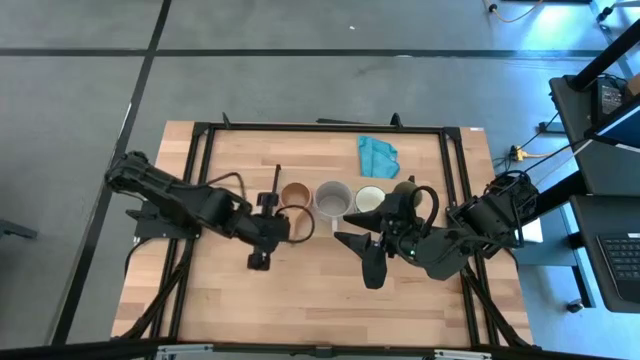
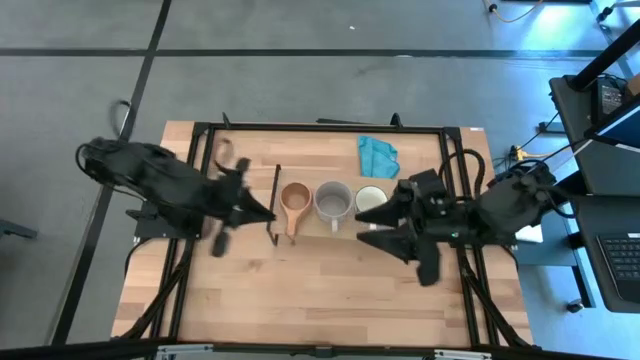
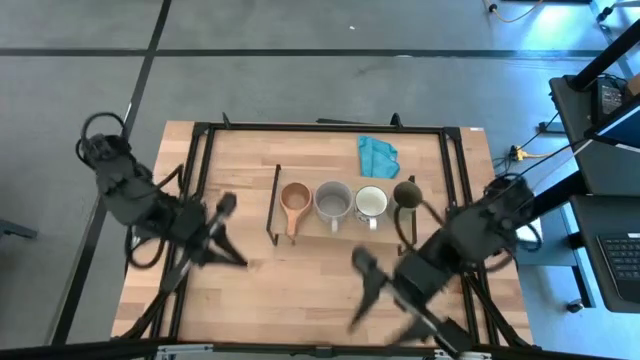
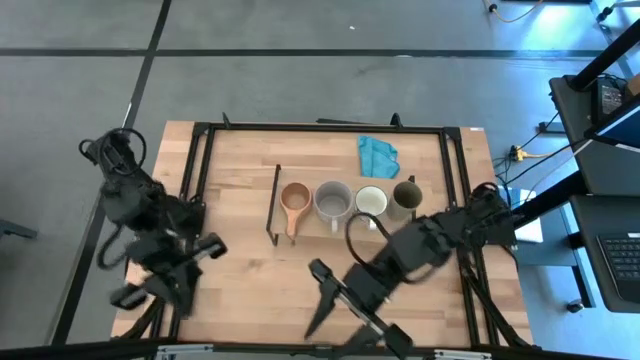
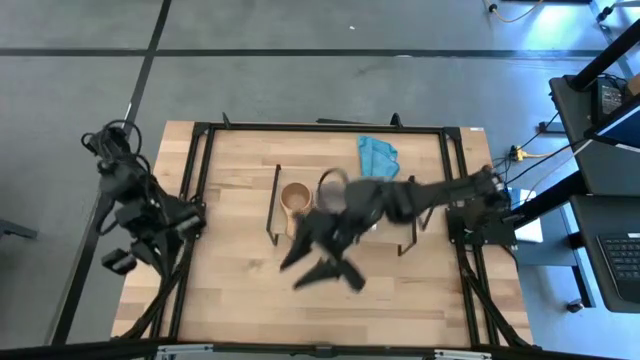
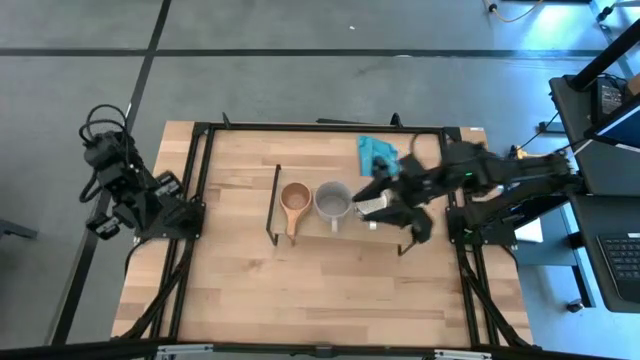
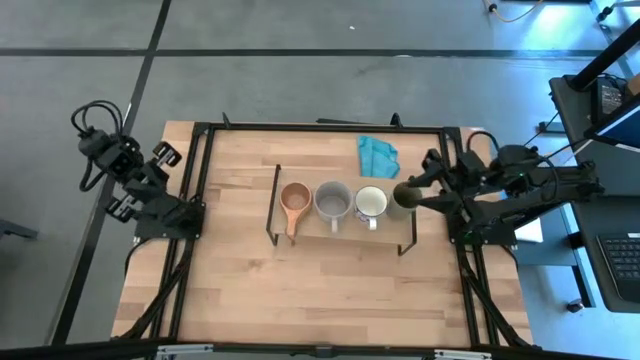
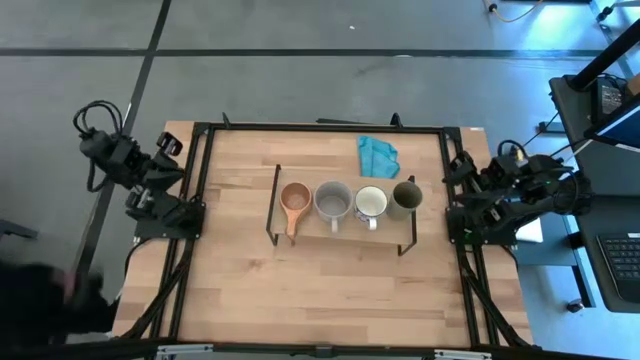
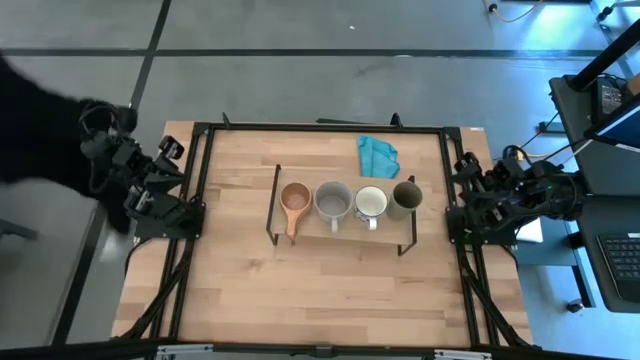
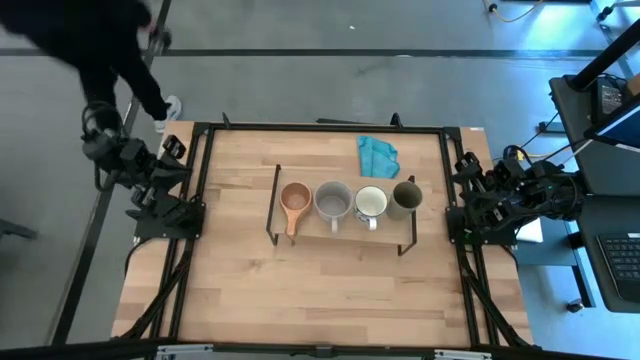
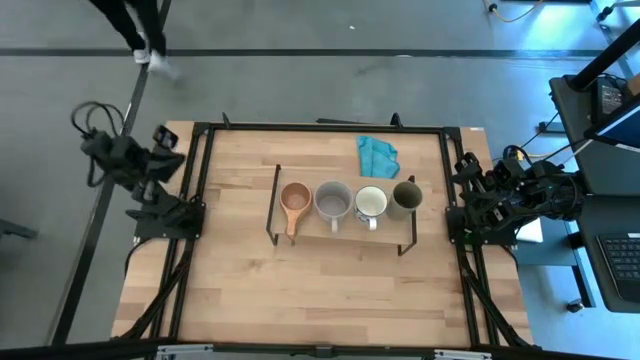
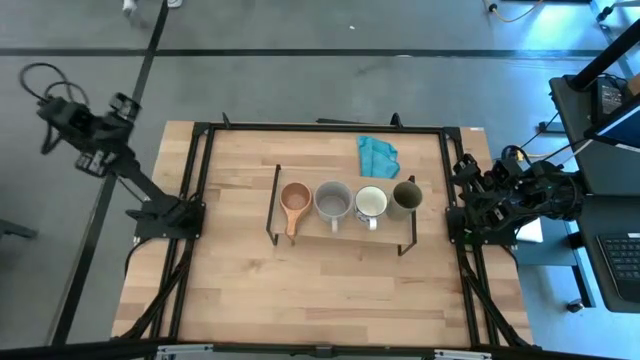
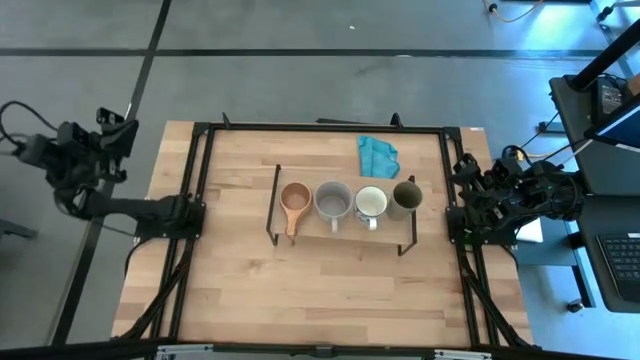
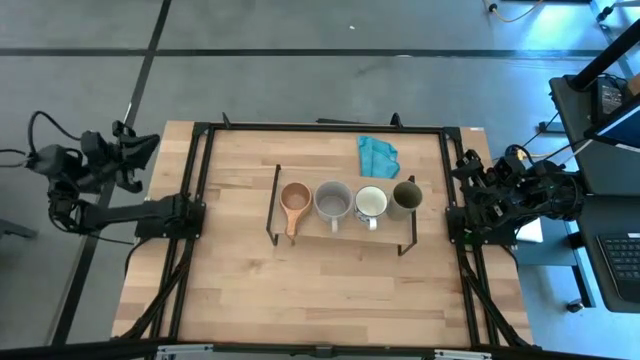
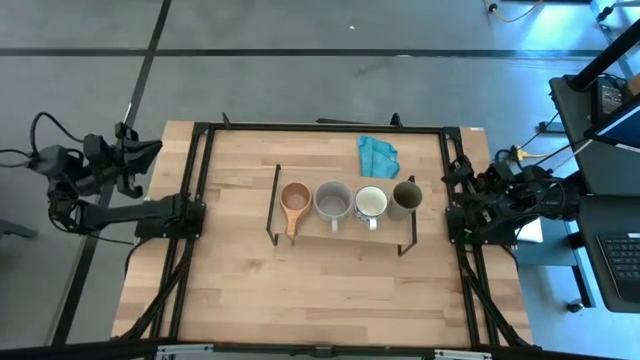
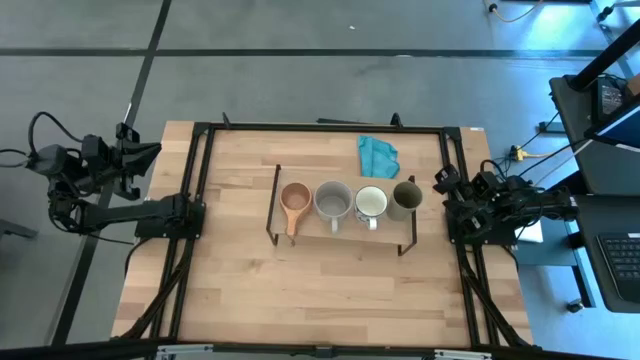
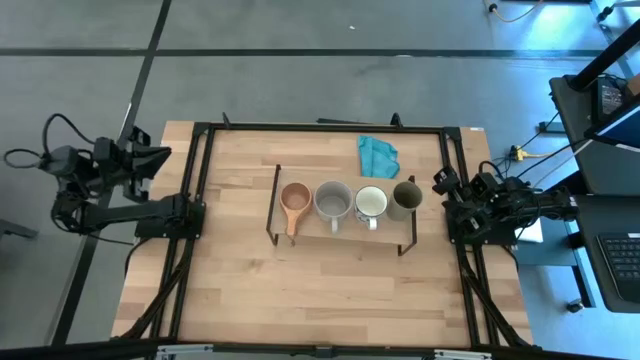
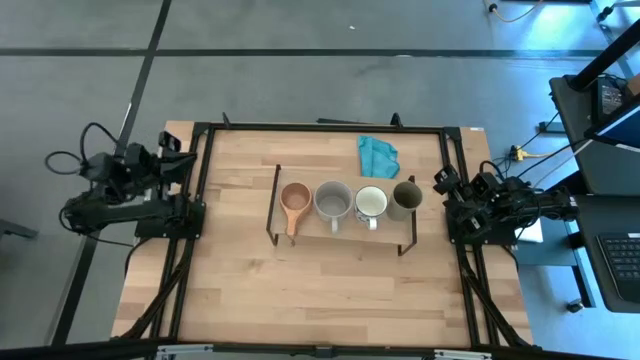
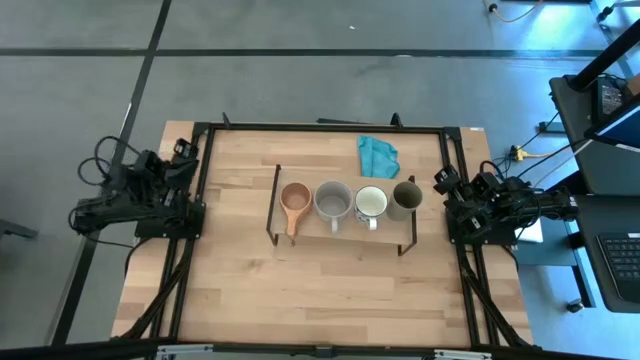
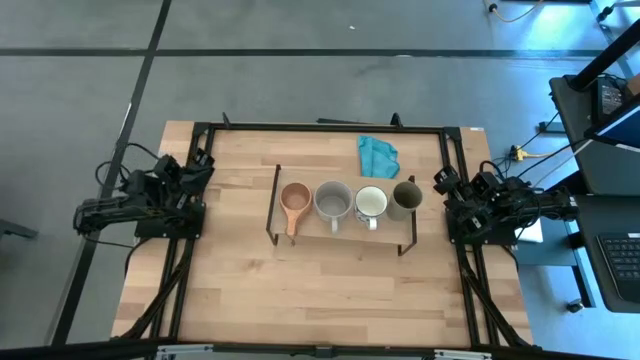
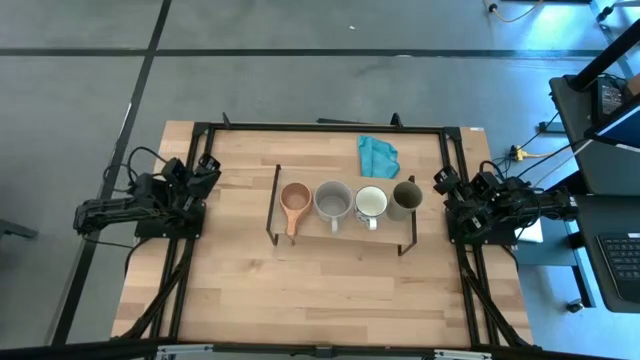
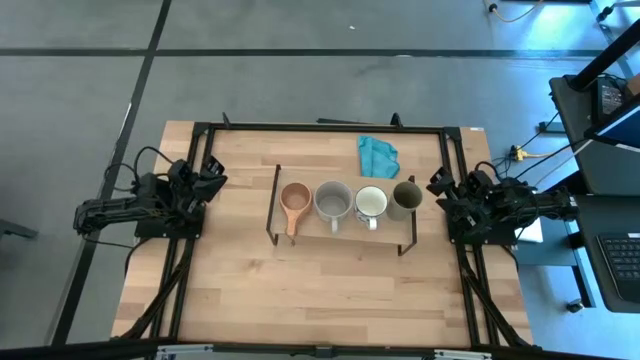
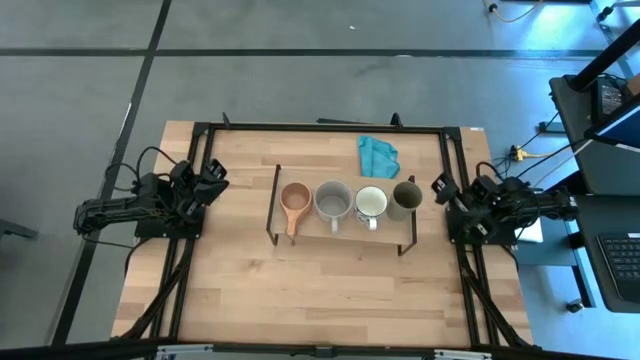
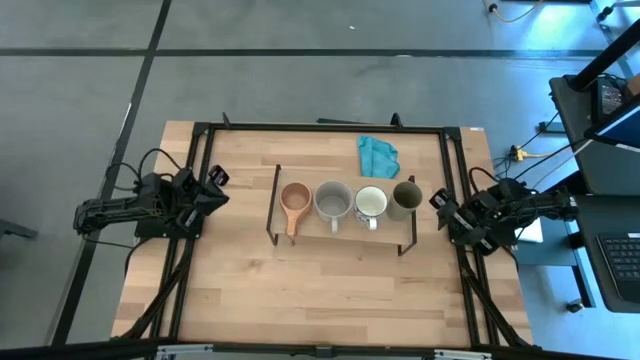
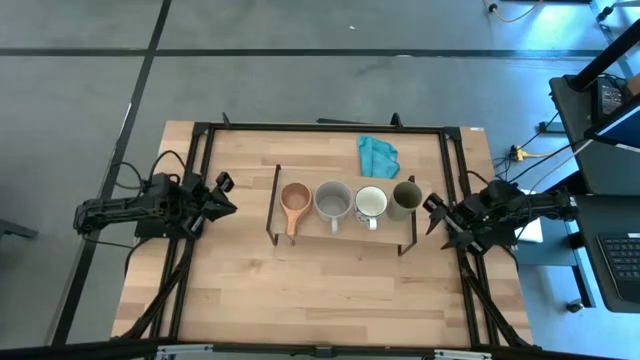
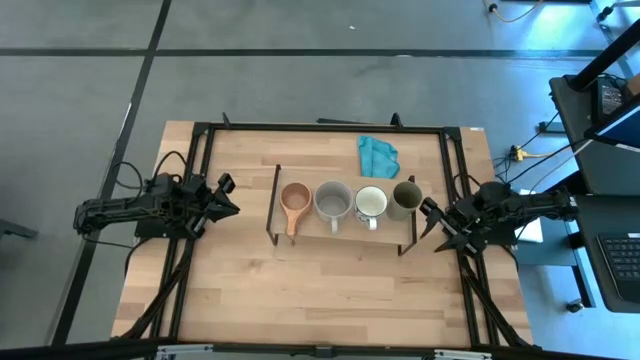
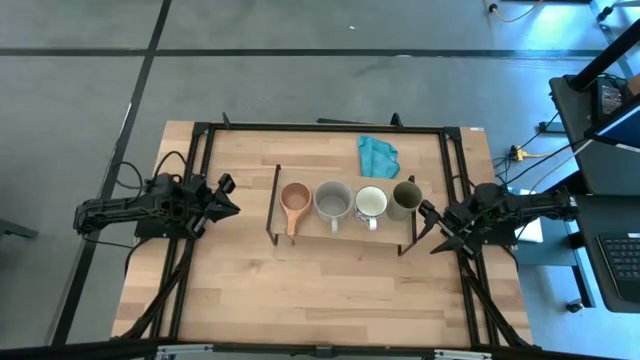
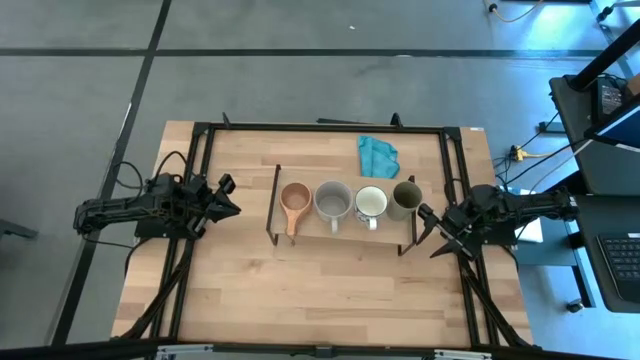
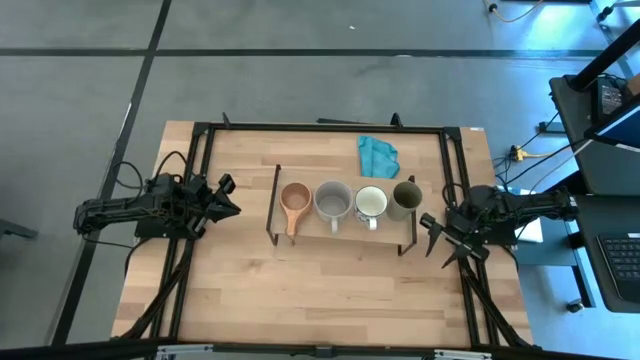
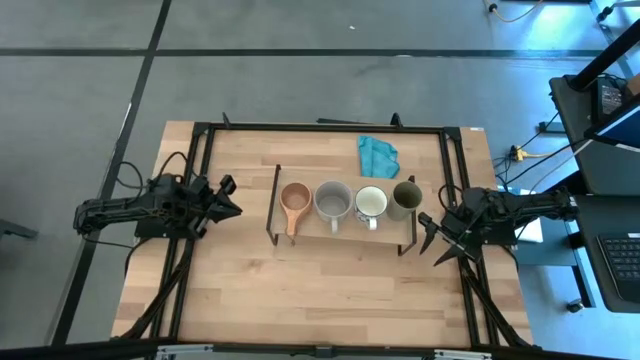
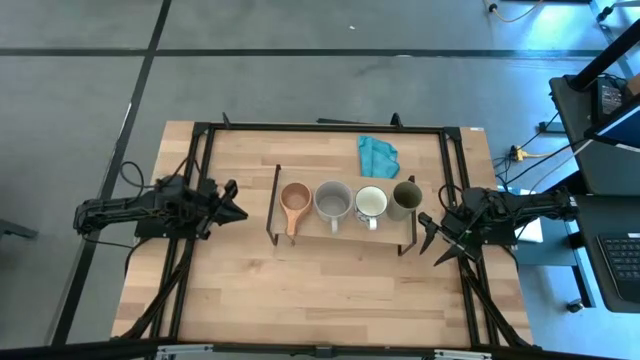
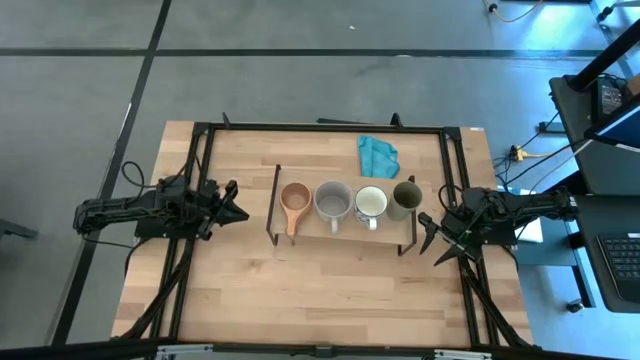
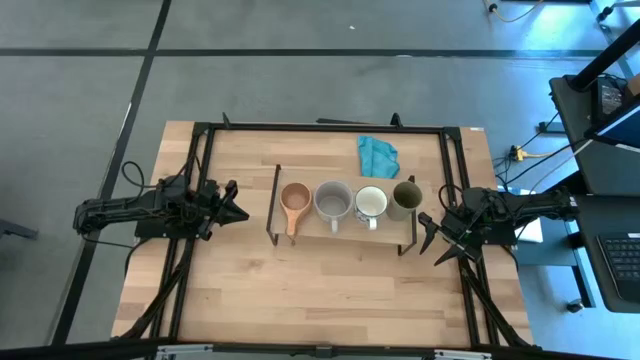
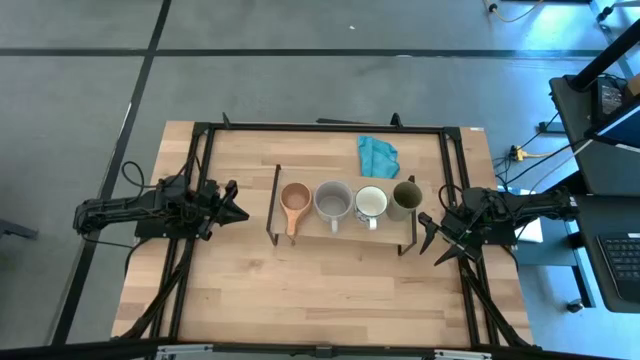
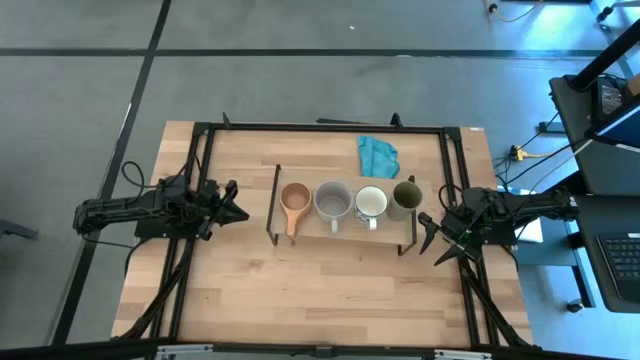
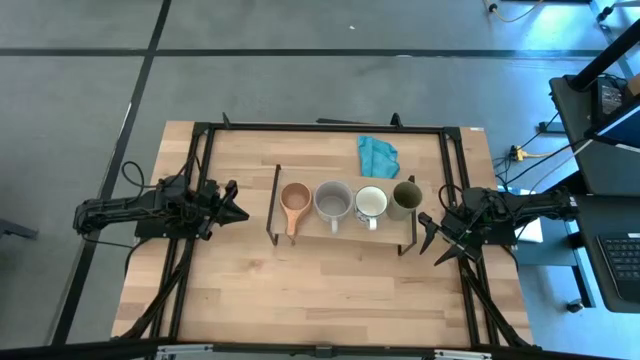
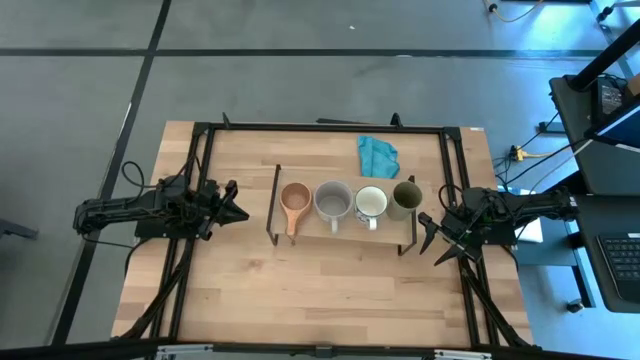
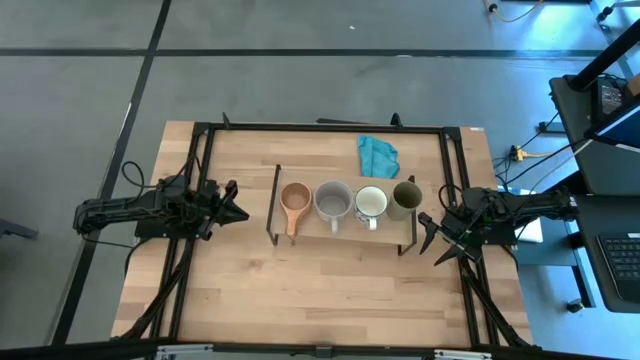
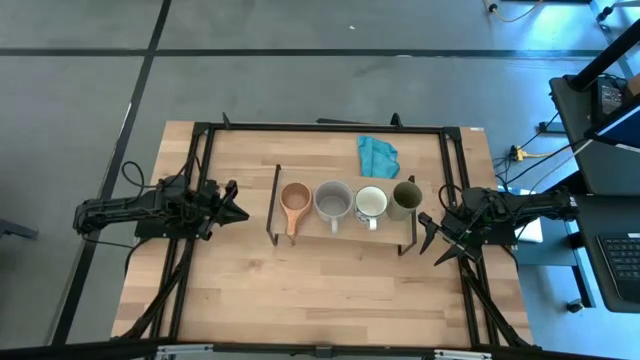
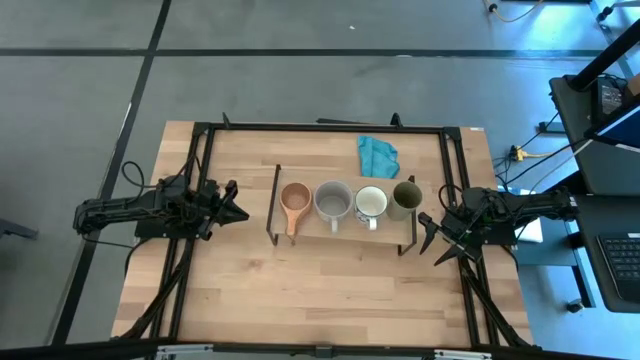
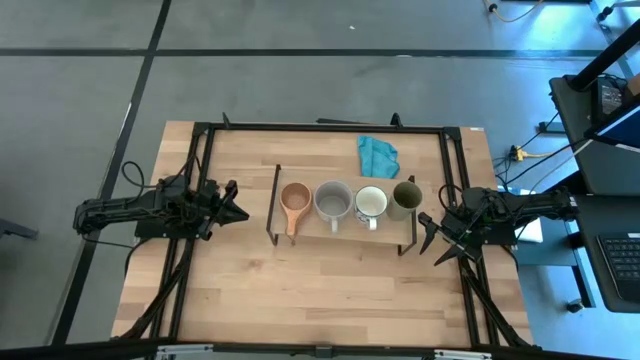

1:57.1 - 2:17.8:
Task: Stack small to large cups/mugs on shelf
Return to Home Position

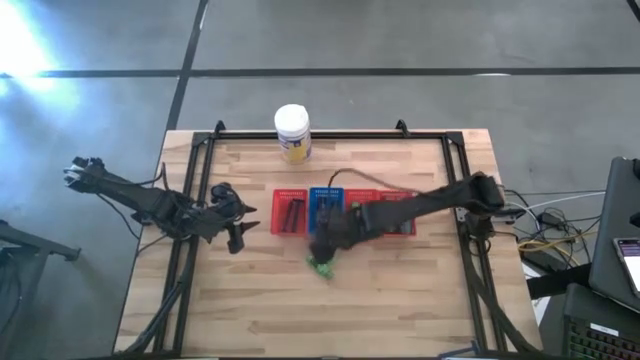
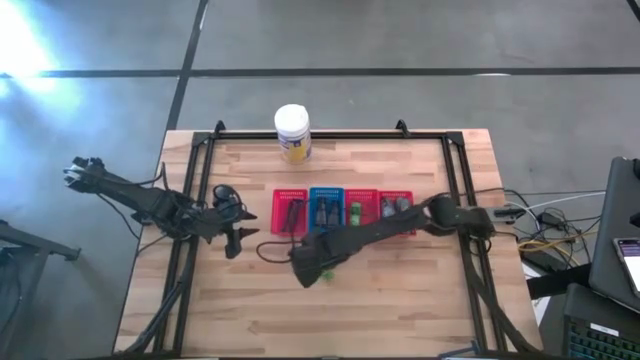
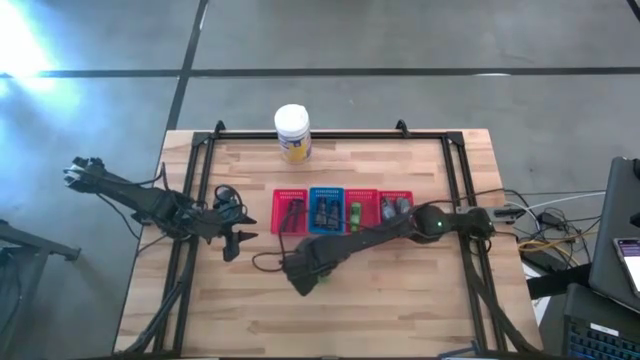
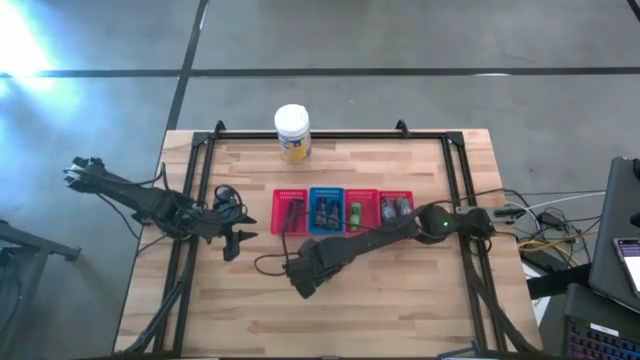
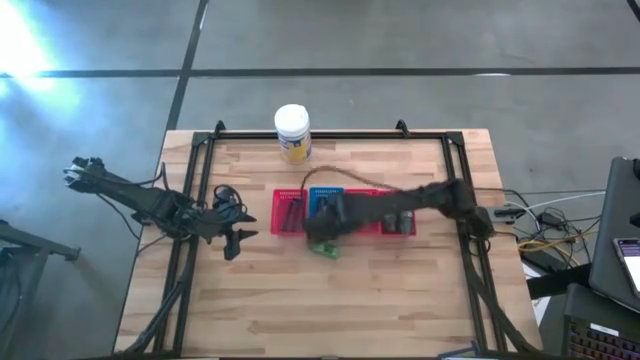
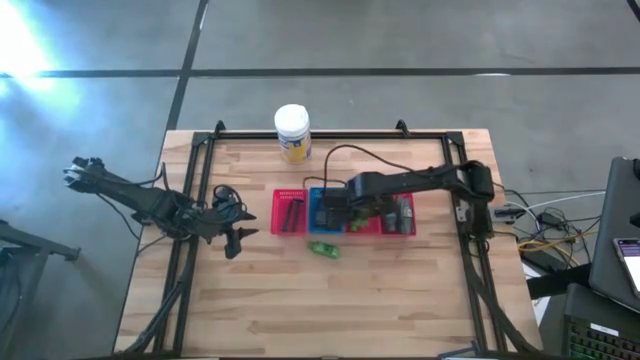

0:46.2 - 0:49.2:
Task: Pick & Place Travel size toiletries
Put the bottom shampoo into the middle red bin
